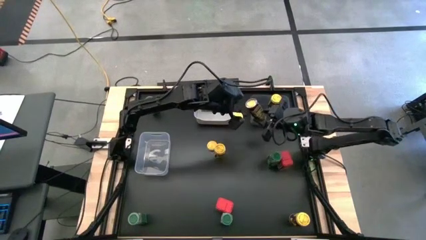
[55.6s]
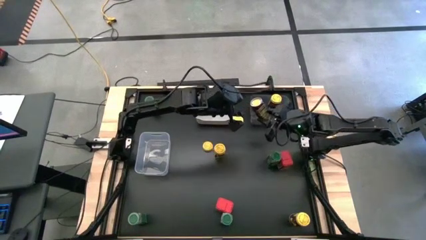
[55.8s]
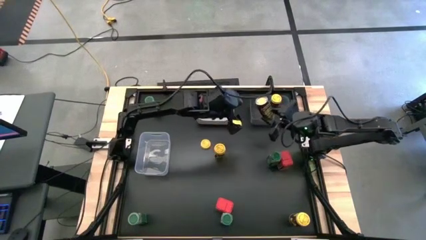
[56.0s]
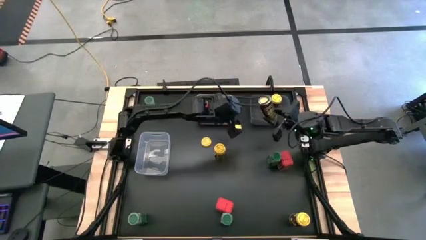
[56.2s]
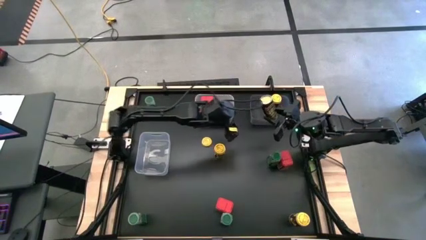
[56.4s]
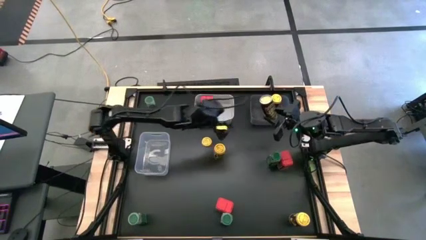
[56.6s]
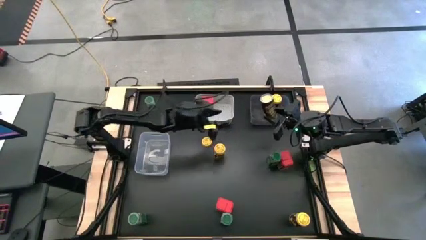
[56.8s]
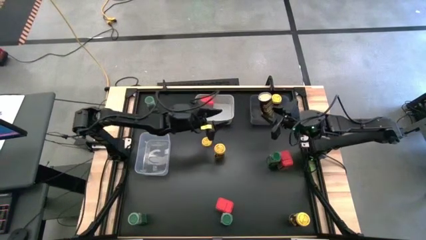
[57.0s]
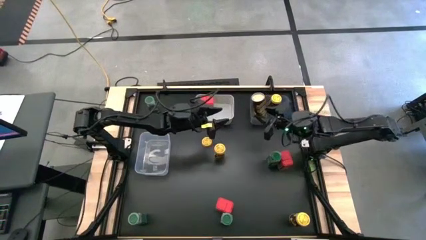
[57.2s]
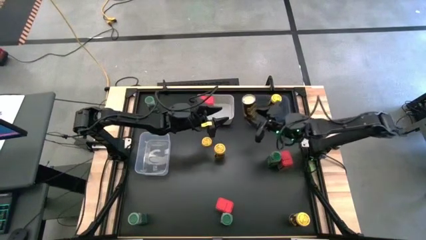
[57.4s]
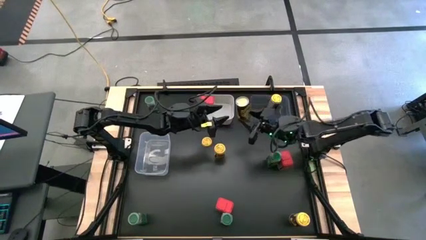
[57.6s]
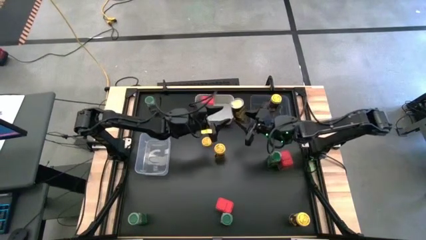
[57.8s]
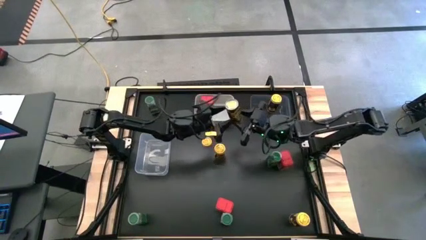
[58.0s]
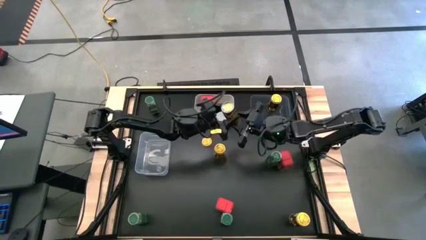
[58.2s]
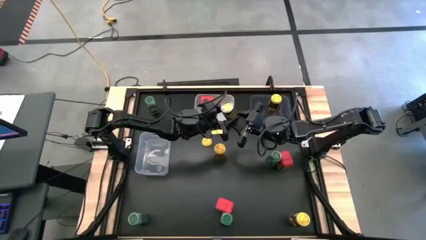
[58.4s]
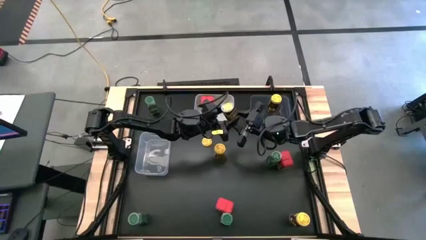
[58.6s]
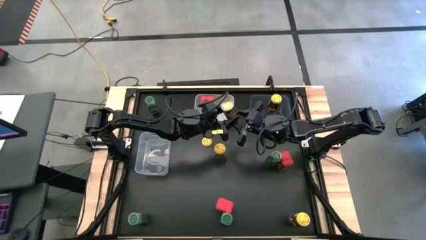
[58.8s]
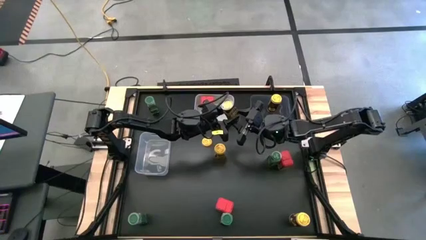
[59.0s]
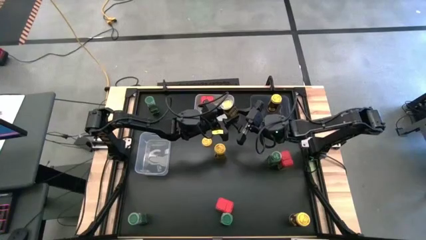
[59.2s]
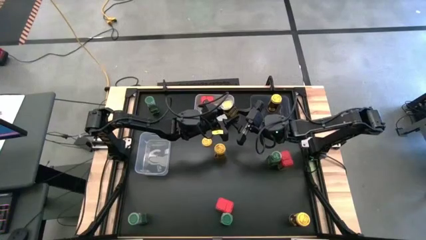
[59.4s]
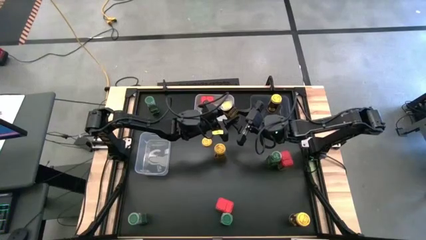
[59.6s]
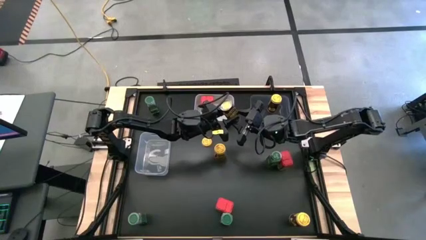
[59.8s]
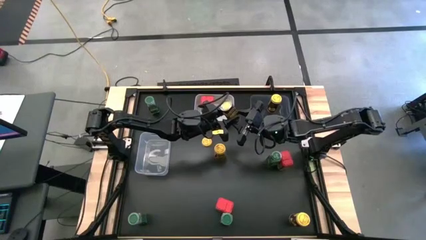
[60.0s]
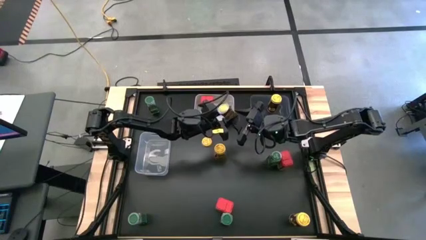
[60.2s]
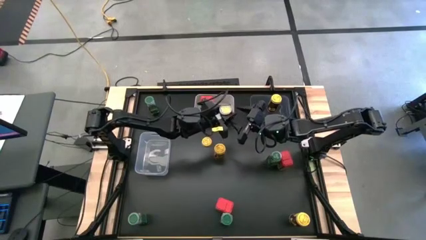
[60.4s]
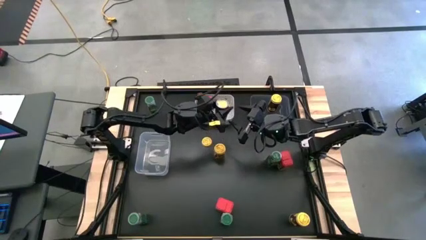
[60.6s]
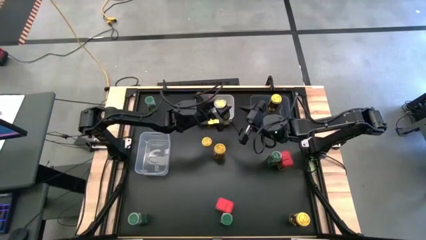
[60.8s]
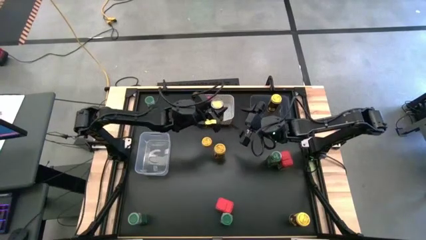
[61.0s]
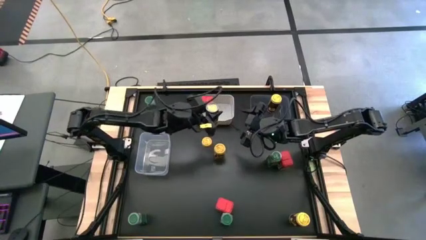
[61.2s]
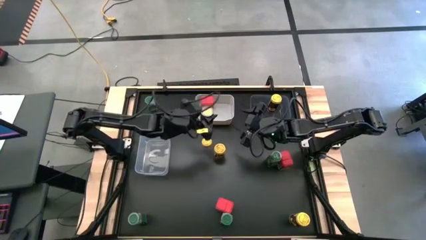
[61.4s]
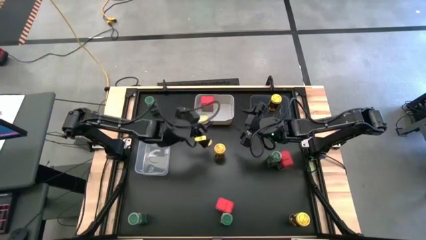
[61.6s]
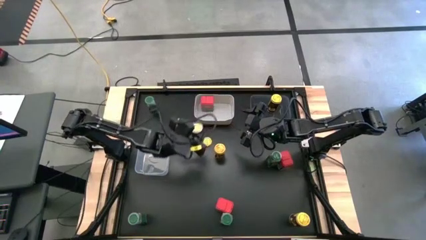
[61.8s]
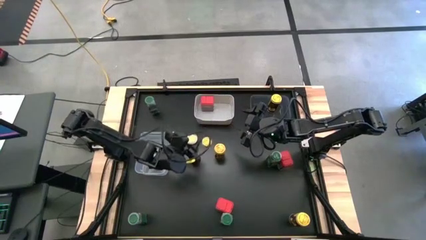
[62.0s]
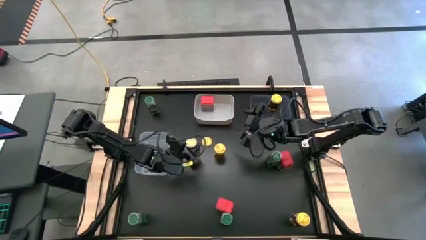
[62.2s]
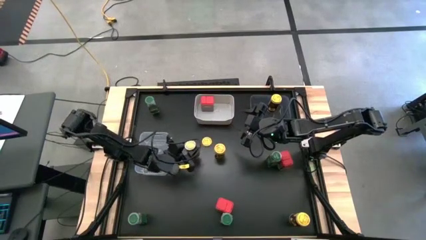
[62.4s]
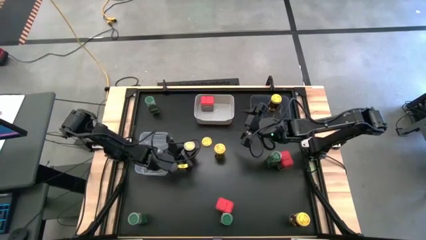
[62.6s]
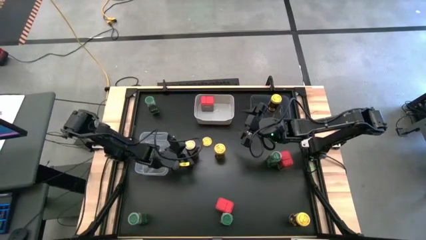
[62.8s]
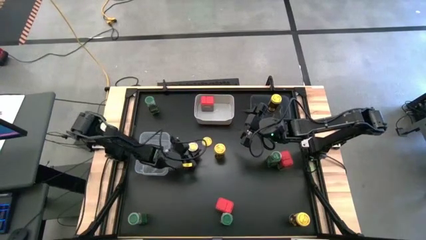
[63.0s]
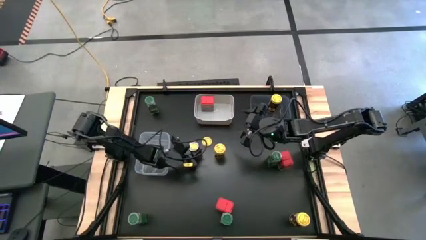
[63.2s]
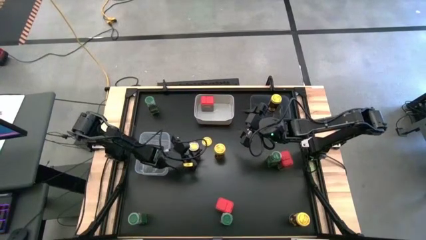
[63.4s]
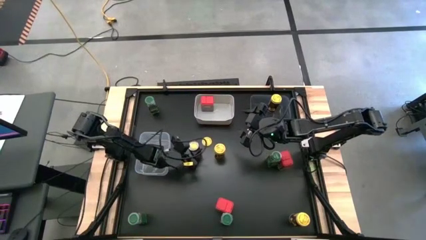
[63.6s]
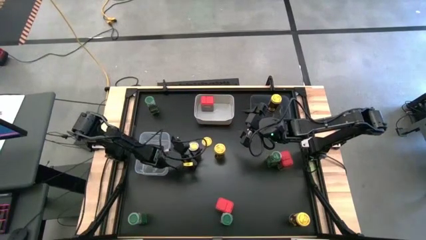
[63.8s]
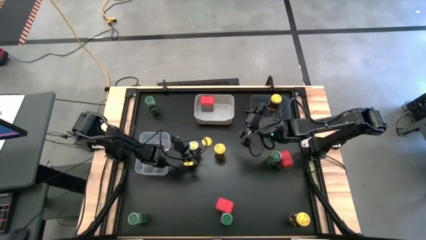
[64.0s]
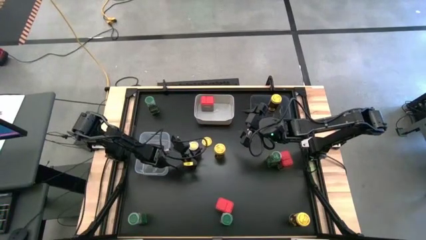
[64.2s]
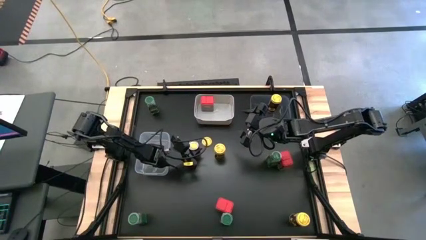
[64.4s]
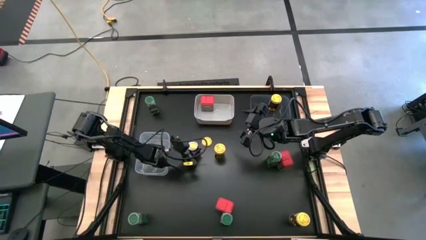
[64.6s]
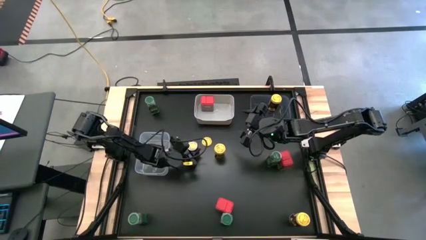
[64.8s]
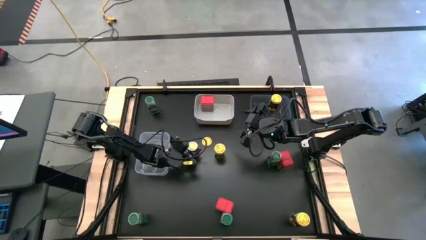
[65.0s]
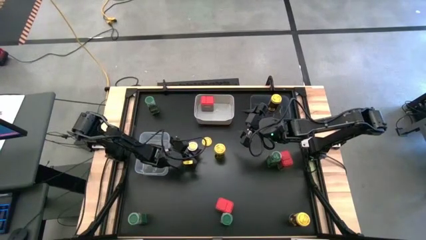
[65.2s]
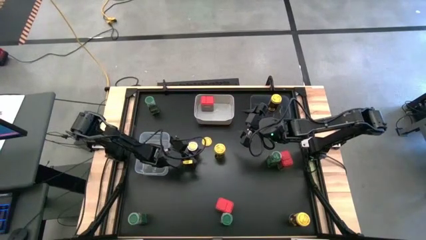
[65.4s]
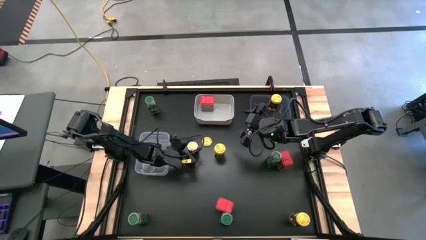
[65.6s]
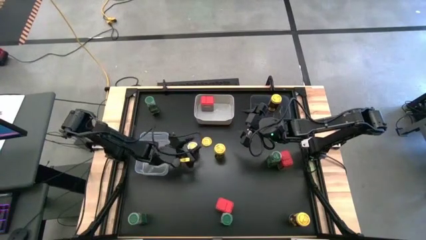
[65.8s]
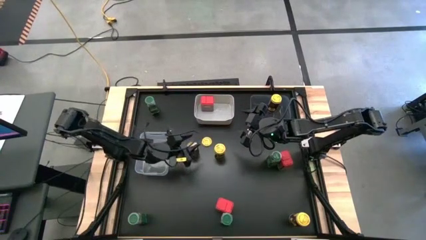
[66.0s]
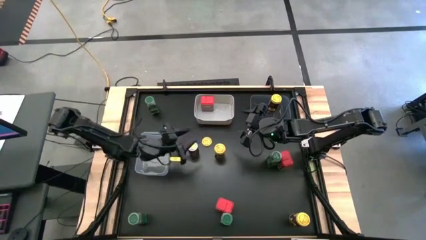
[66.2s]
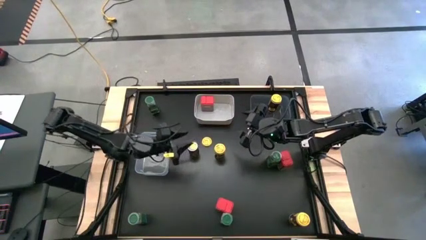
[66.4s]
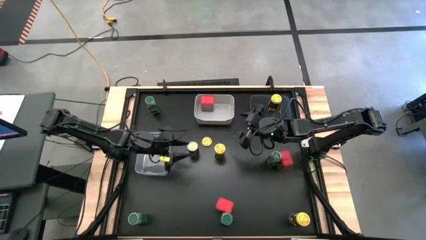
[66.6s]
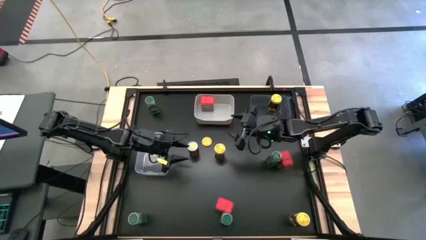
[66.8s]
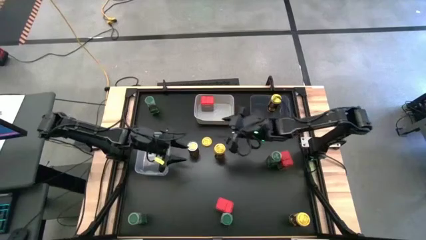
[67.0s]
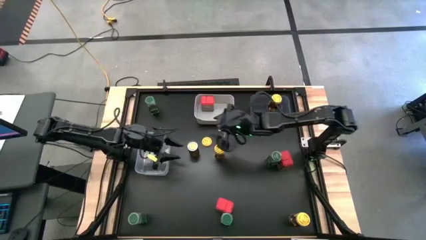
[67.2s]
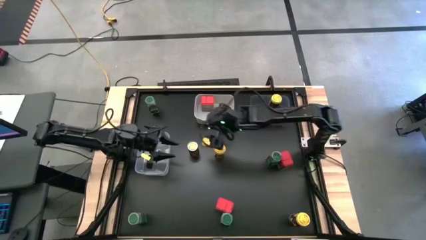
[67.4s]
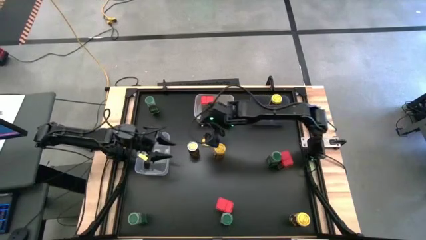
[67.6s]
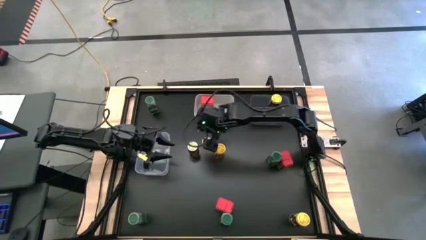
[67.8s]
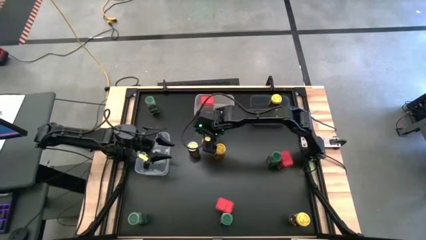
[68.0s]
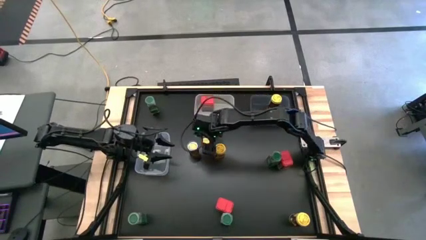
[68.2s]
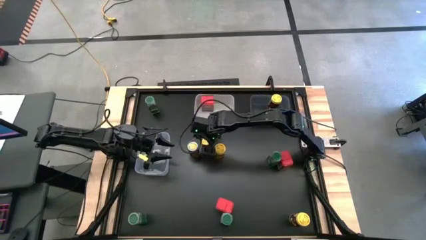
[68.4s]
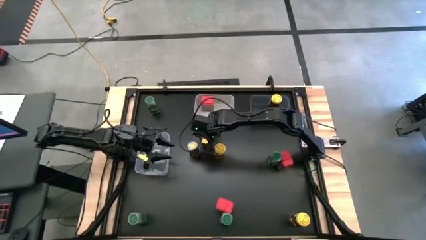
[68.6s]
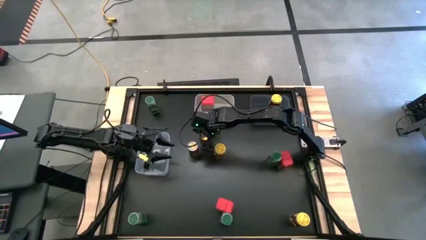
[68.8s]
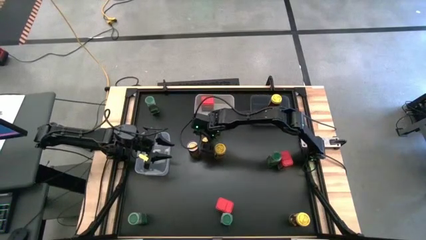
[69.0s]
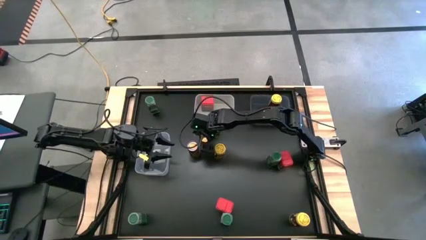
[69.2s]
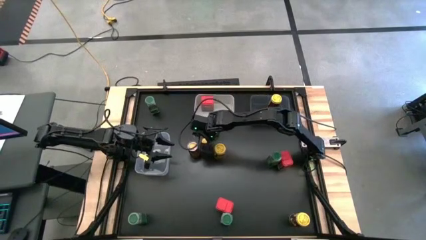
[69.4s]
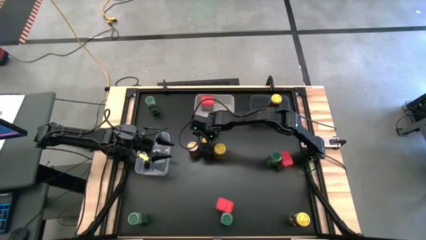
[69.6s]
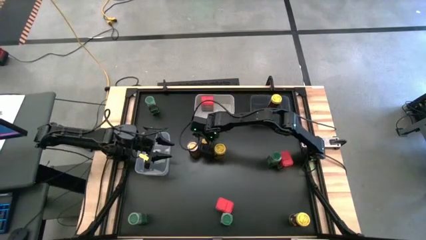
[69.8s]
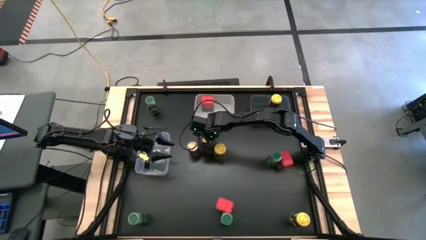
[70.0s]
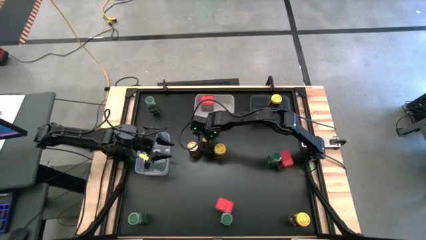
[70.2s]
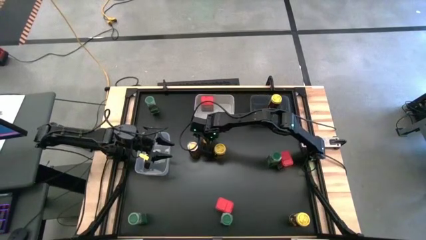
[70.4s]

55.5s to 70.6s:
Task: Sort spices by type
Put the bottom left yellow seasoning bottle into the black bin

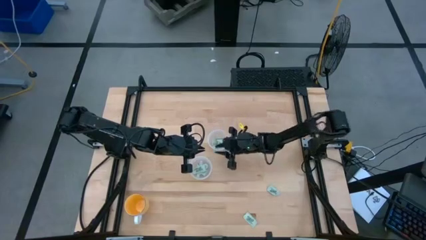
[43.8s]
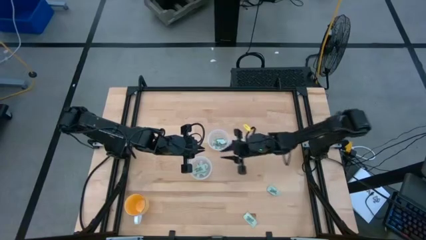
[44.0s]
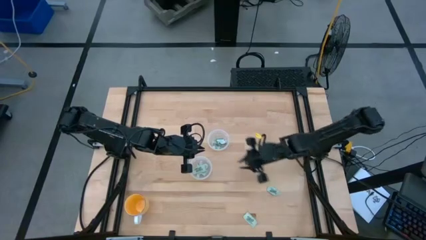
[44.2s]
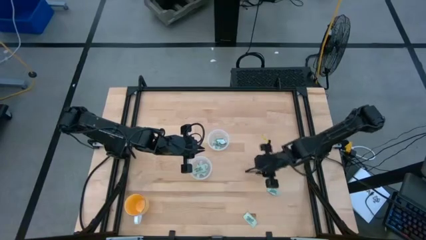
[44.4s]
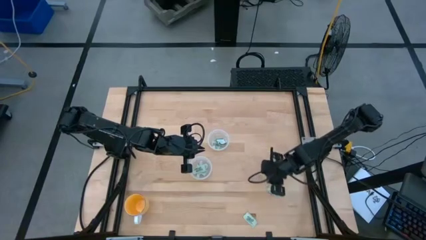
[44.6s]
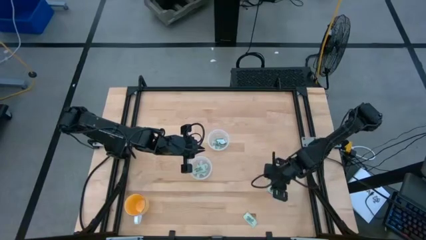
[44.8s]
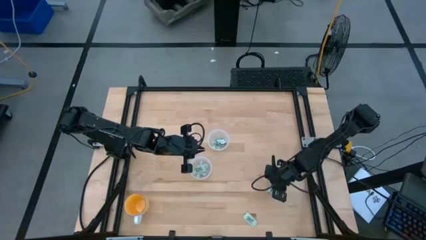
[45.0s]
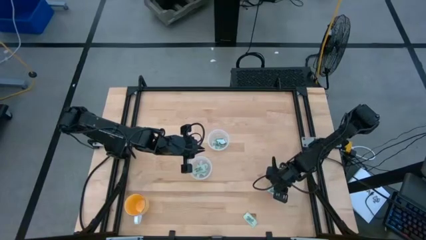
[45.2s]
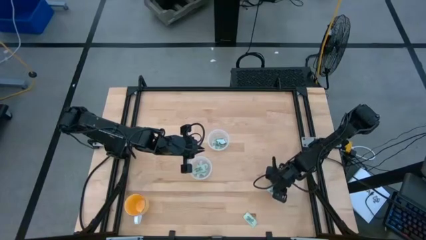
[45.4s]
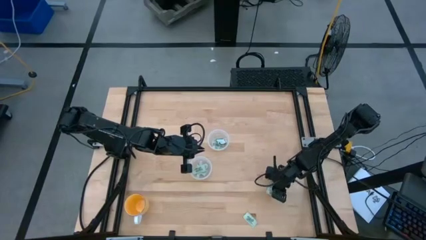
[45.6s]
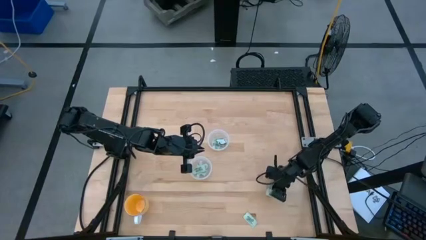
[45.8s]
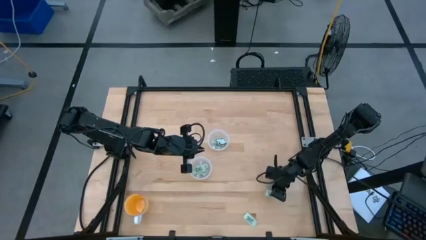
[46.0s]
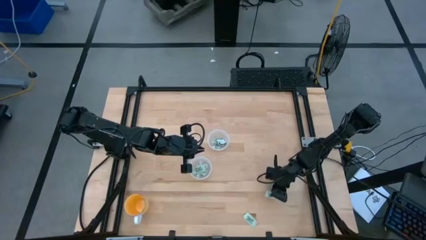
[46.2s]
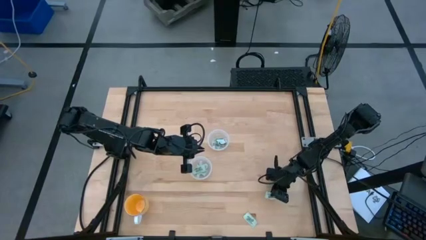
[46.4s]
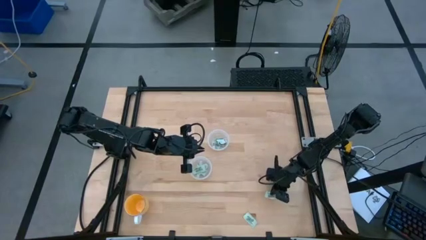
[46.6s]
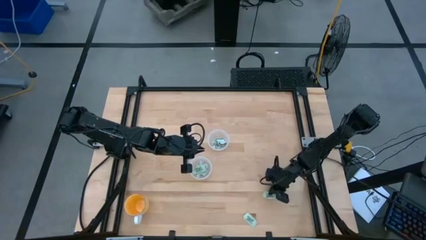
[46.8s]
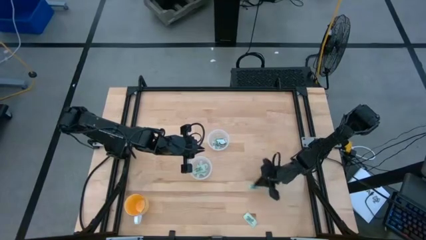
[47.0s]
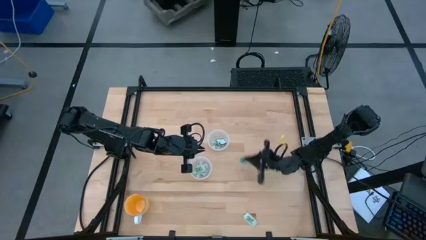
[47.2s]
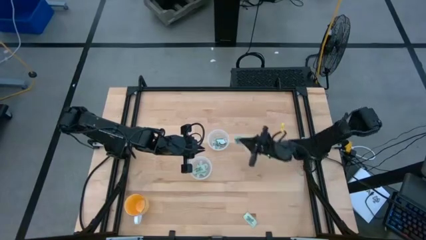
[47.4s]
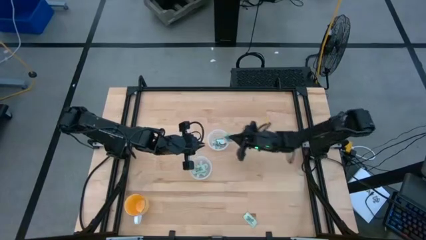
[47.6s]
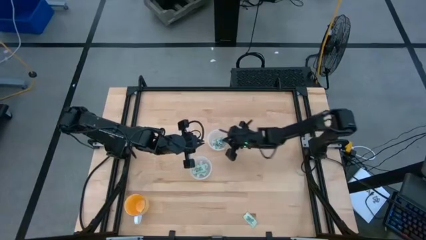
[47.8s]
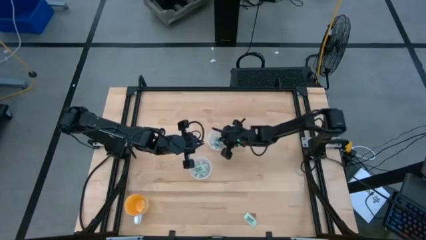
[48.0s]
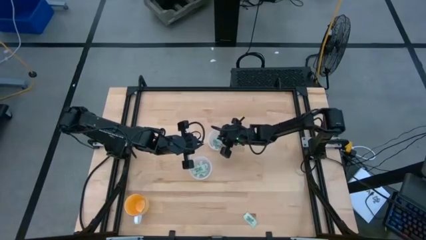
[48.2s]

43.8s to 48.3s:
Task: Pick and place Stevia / Truvia into bins
Put the stevia packet into the top transparent container
